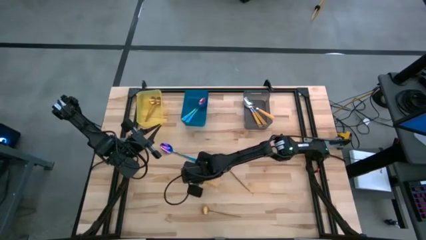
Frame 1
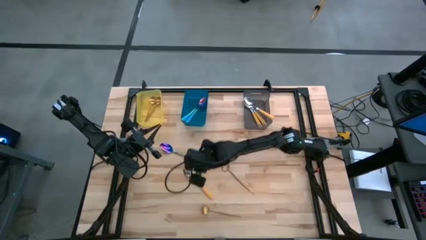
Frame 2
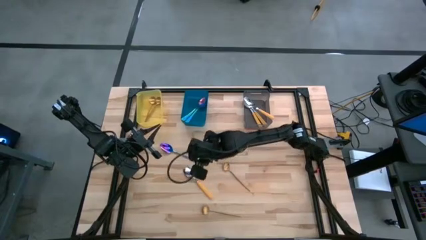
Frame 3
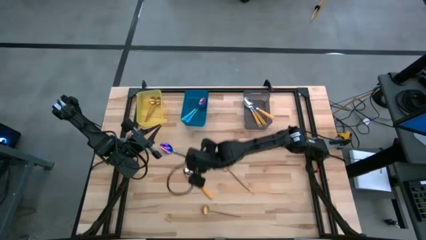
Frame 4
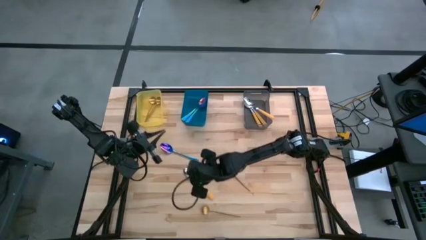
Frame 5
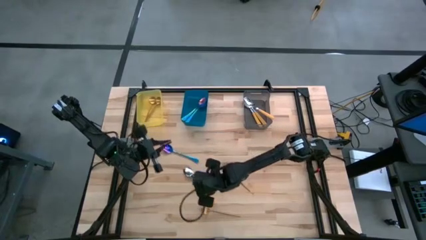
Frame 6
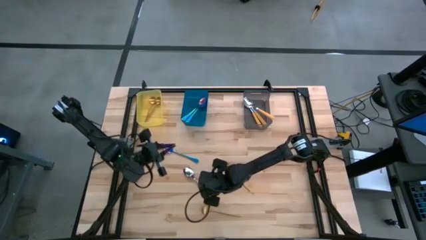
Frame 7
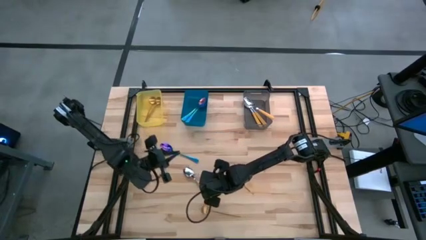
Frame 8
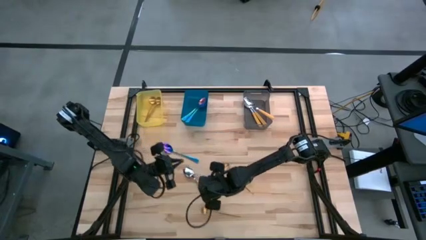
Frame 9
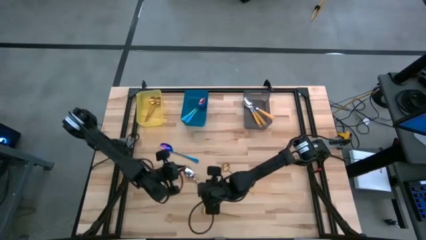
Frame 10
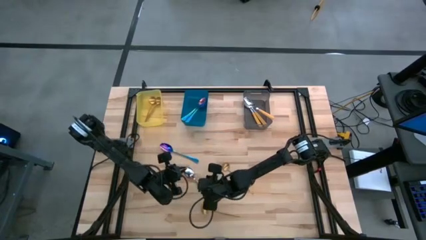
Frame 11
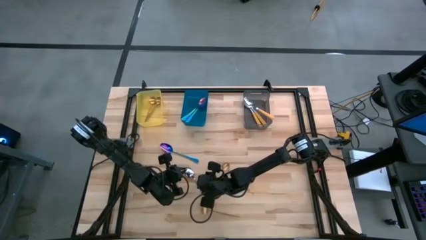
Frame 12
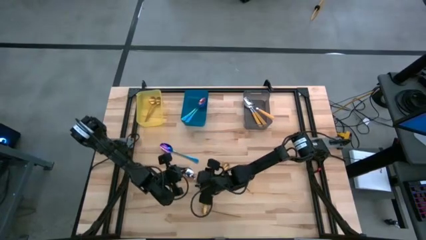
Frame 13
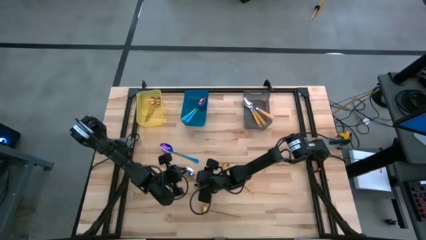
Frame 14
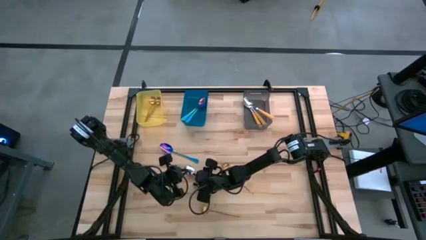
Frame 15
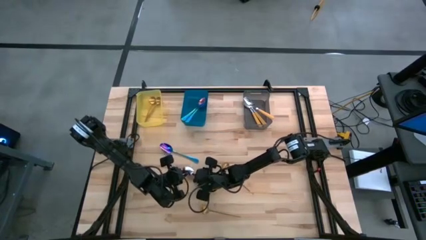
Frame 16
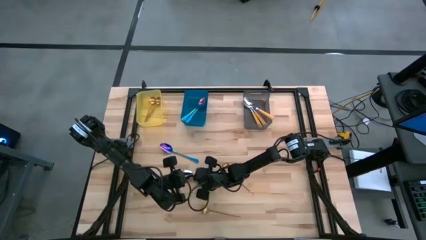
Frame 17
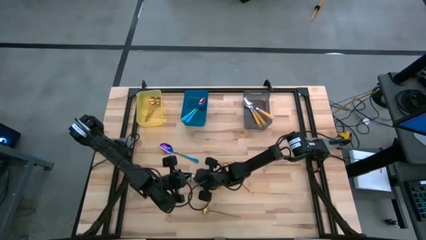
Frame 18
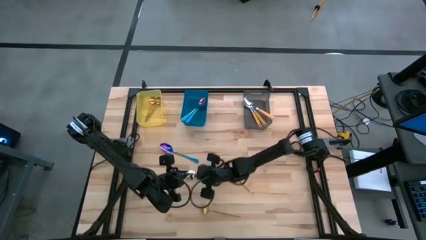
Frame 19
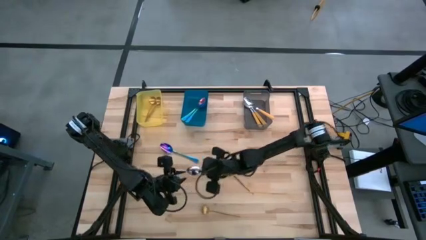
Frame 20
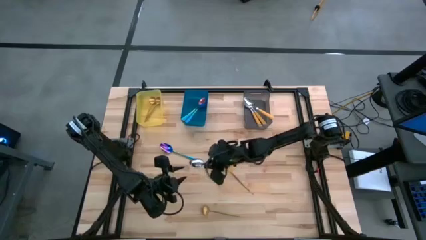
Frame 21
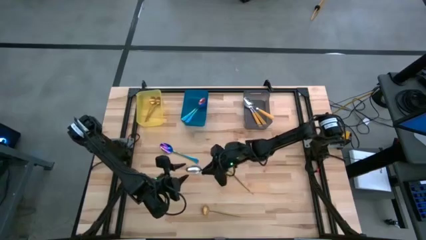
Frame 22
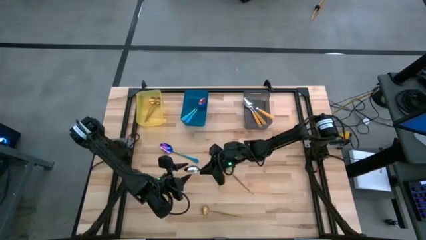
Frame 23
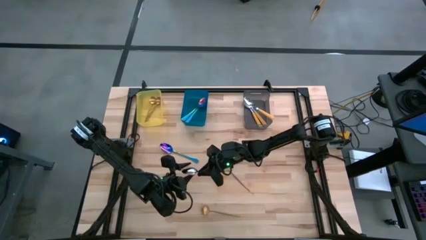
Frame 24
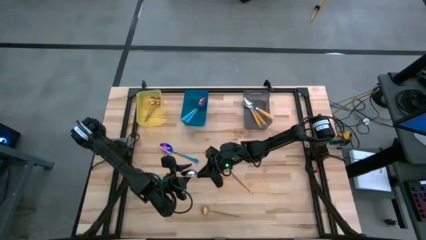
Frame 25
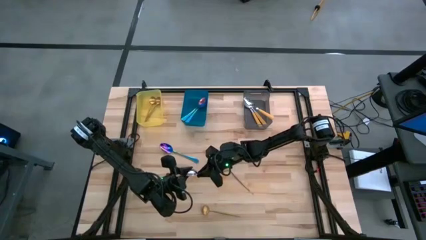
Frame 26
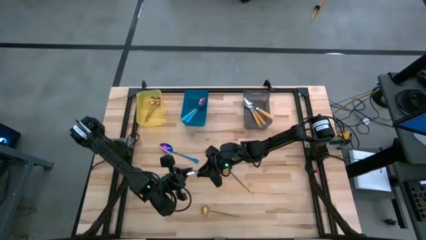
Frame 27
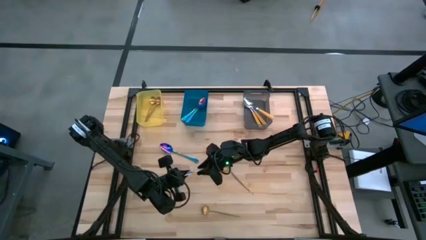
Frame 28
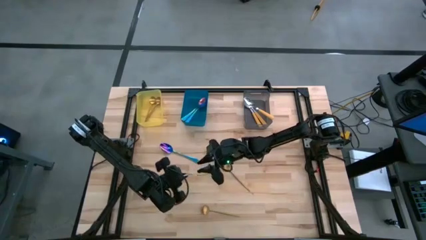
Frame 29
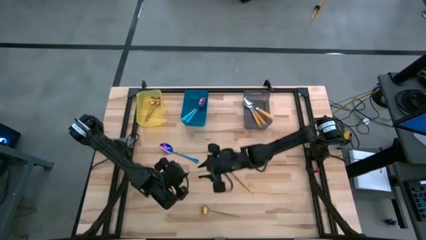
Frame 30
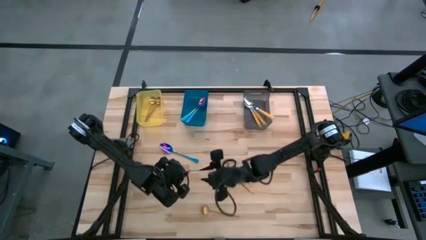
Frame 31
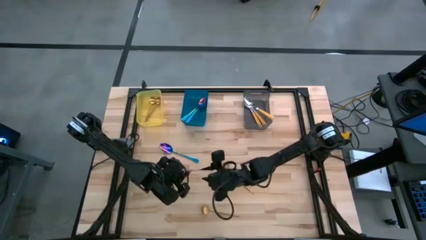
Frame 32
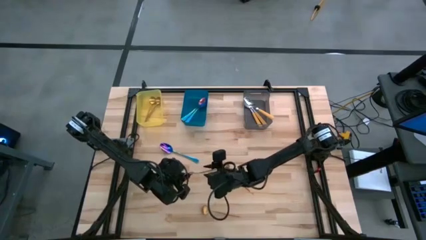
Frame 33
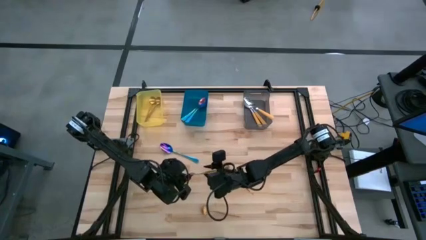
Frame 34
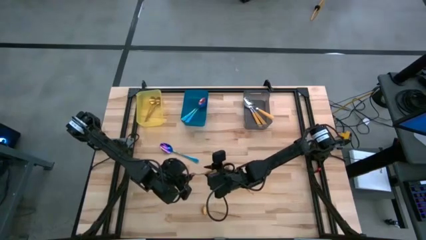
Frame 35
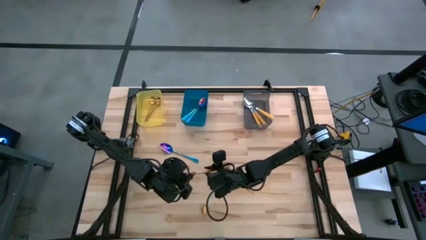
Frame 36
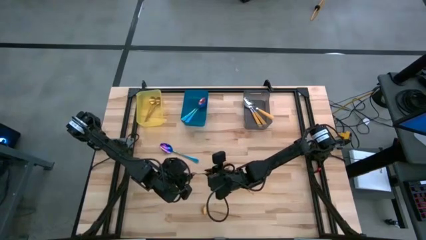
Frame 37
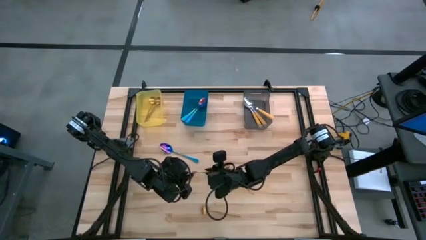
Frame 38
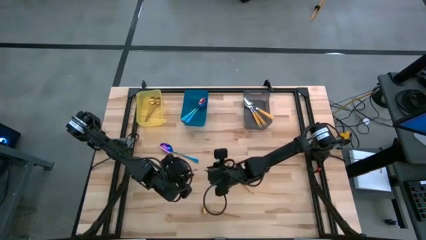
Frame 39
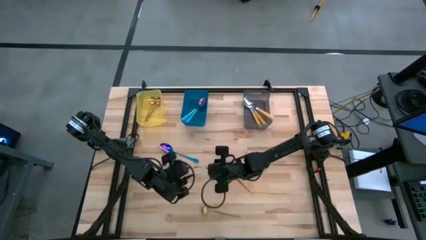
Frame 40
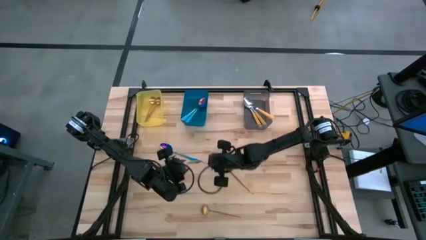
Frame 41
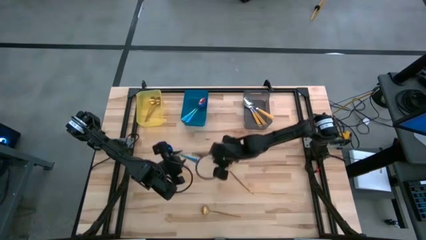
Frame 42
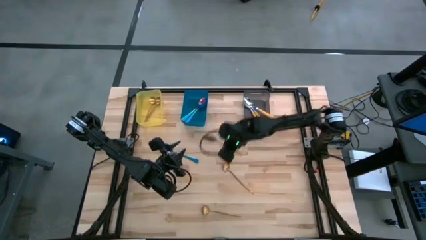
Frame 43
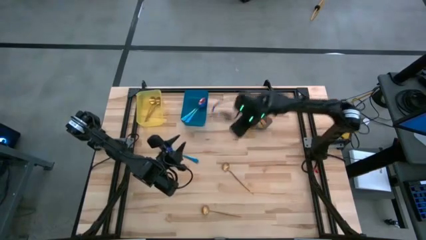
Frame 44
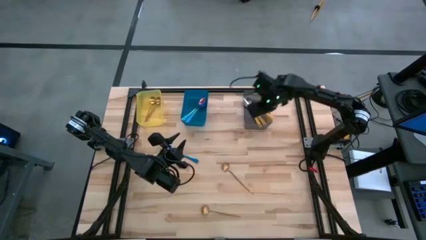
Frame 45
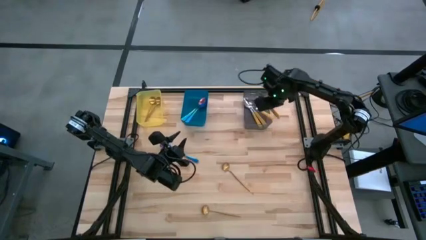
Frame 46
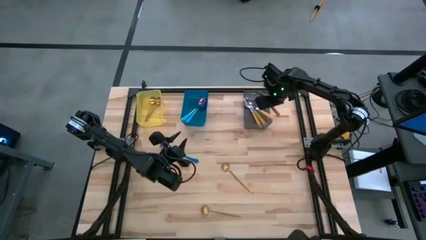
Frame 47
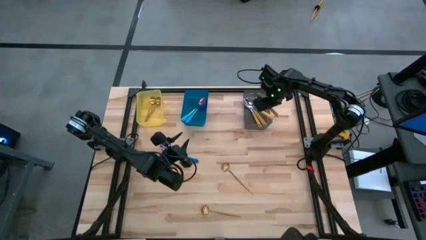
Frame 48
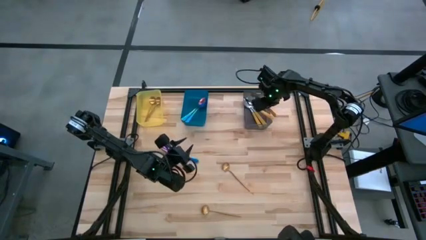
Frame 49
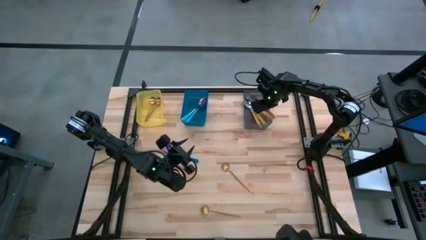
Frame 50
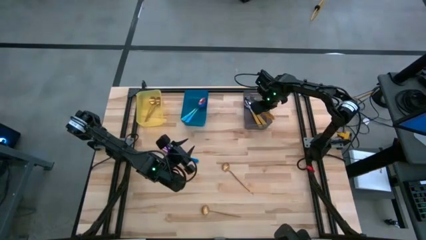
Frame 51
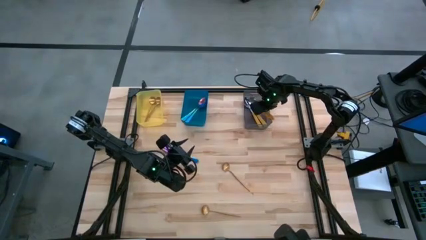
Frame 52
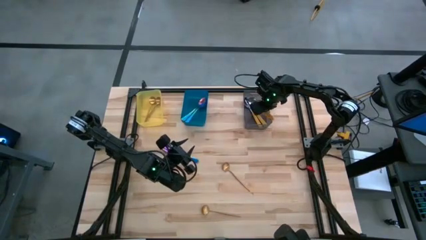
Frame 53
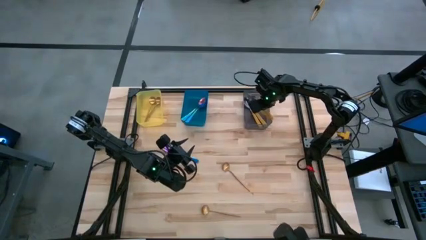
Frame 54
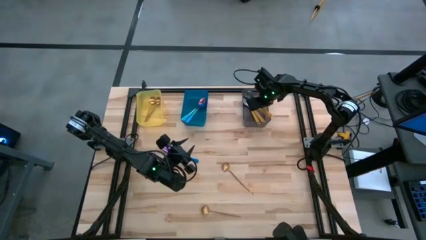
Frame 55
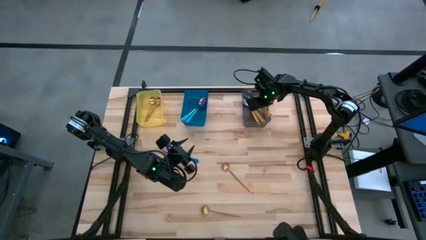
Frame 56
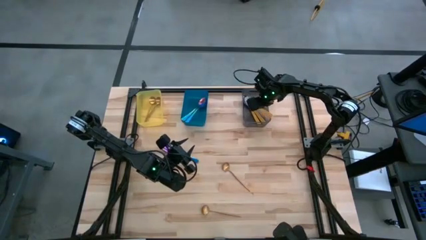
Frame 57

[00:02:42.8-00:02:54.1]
Task: Sort silverware by color (type)
Put the yellow spoon into the black bin

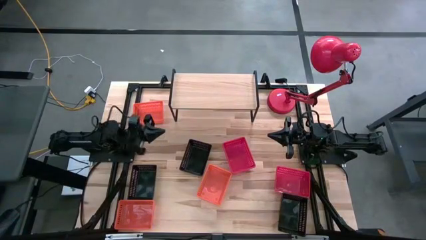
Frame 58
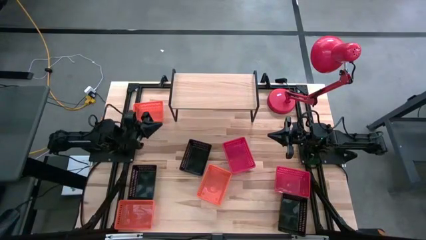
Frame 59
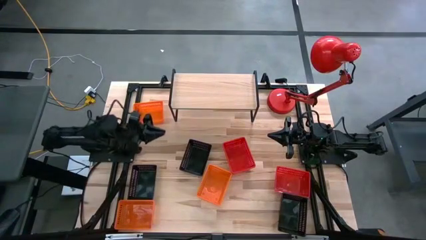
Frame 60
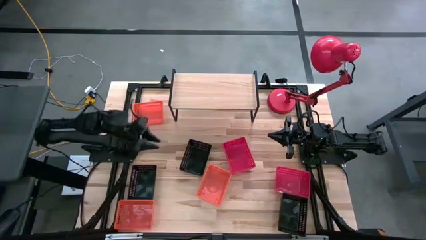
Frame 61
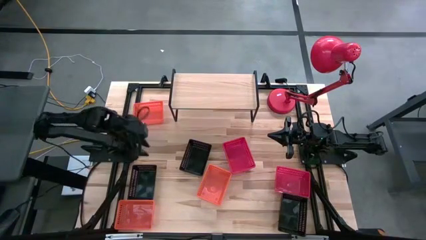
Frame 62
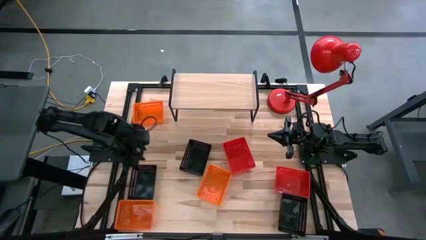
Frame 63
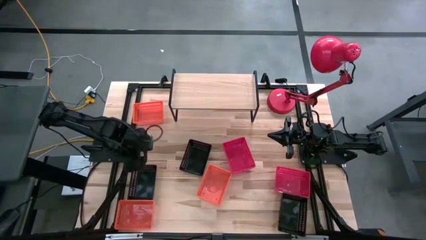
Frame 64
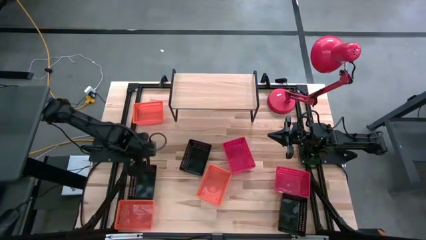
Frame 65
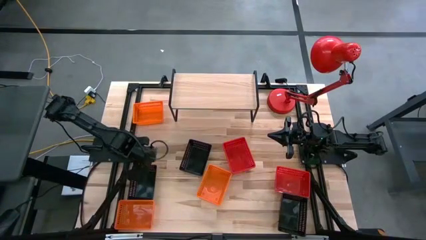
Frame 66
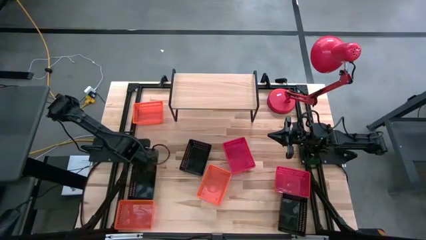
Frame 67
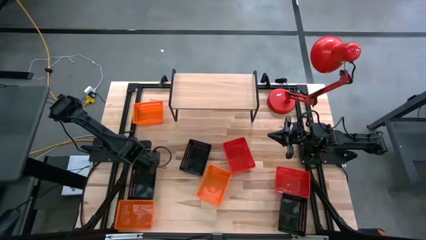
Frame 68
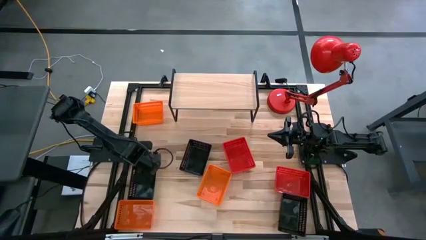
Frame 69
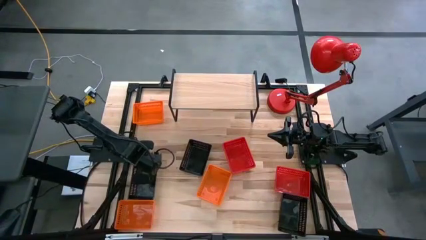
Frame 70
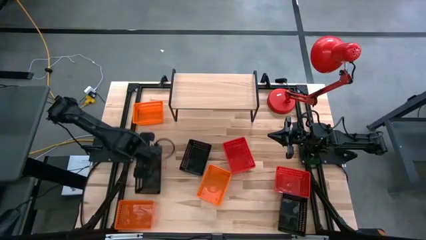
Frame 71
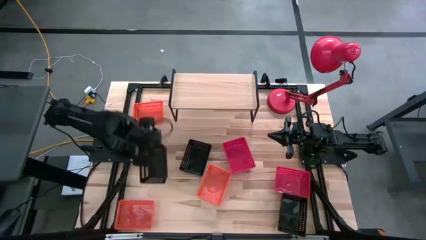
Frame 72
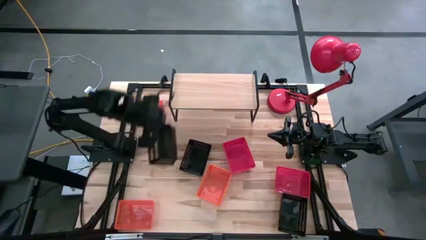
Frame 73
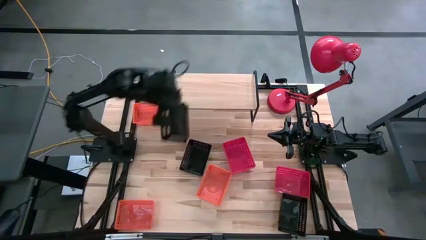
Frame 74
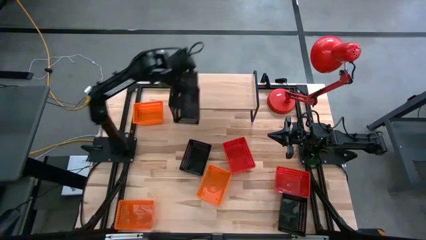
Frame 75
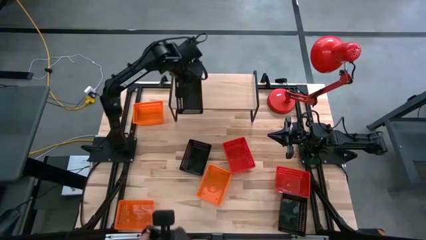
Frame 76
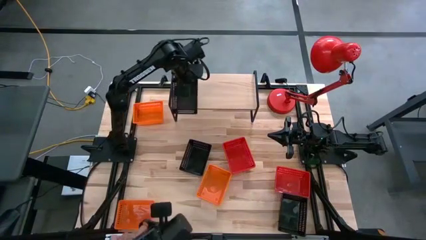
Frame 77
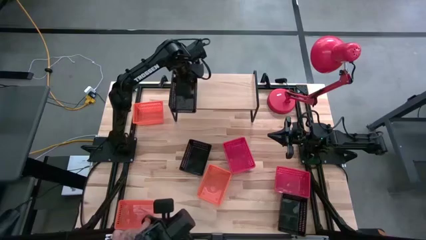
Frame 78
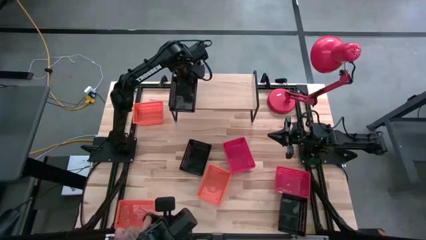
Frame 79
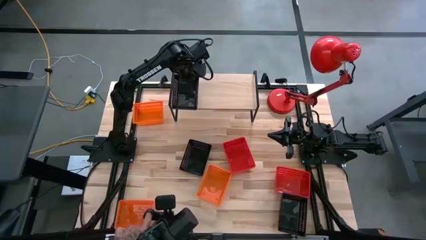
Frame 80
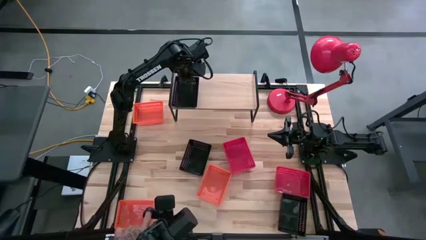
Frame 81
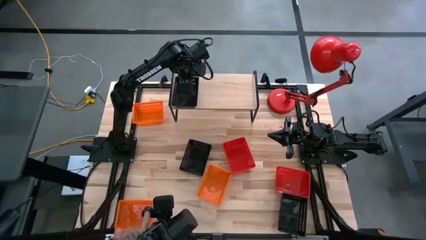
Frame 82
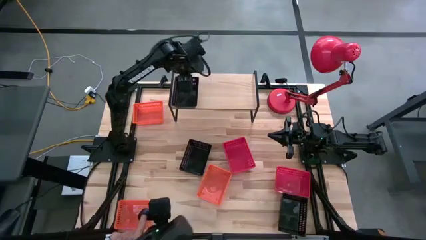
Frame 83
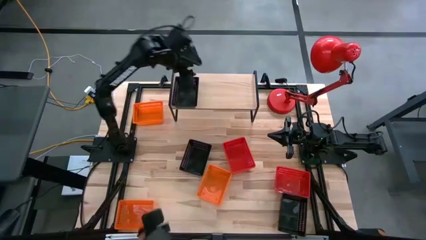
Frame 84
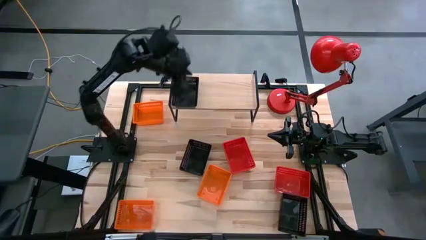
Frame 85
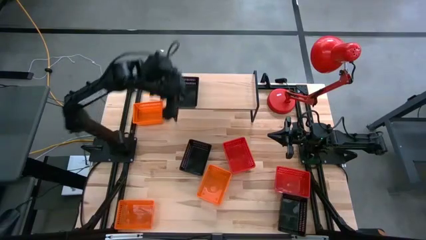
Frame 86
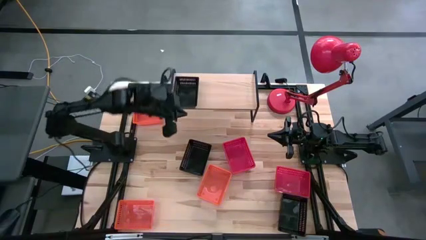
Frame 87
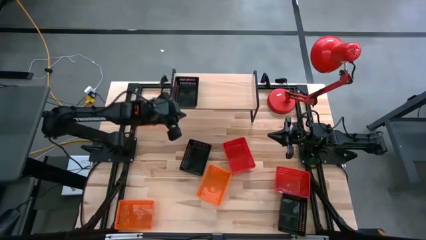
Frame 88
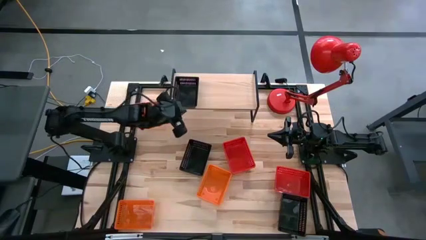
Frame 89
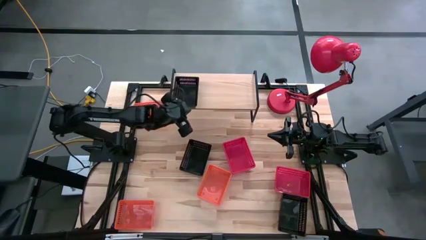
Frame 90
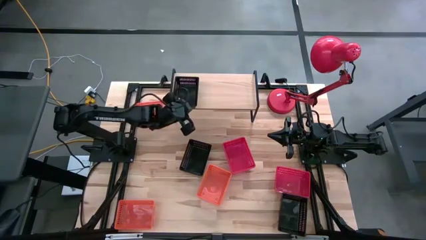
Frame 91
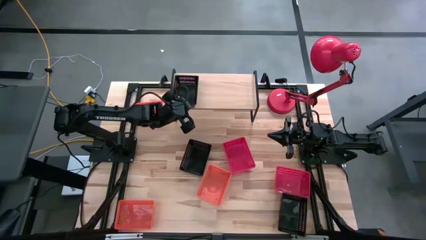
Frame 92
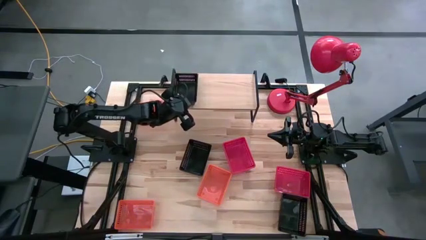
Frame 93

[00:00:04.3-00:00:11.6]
Task: Stack baskets on shelf by color
Put the left black basket on the shelf
